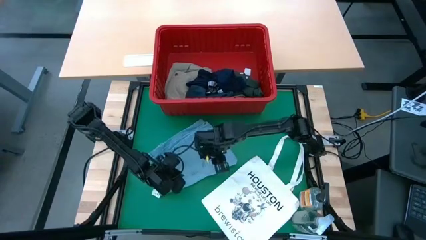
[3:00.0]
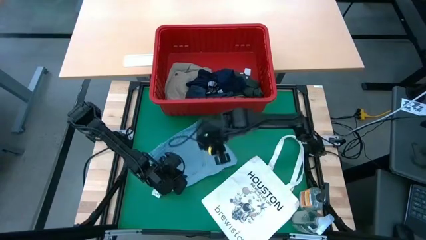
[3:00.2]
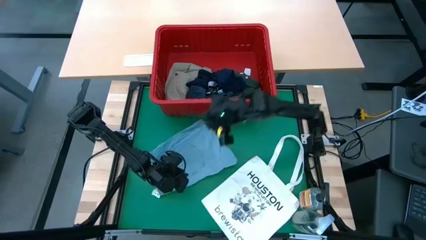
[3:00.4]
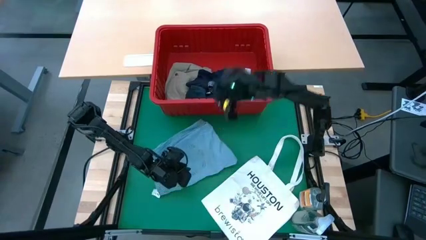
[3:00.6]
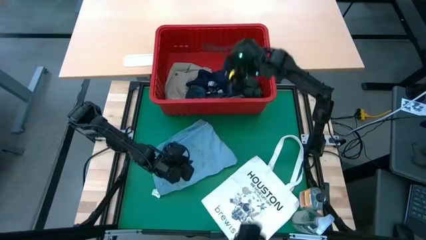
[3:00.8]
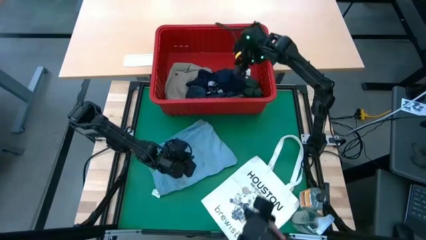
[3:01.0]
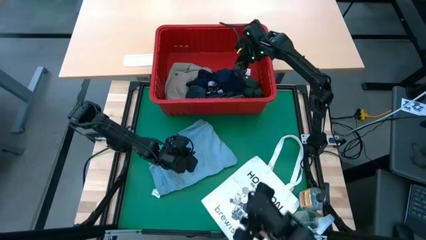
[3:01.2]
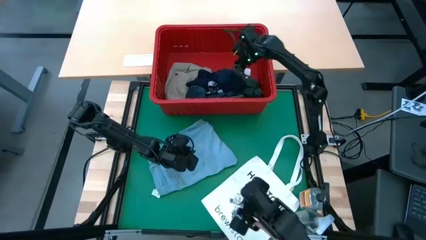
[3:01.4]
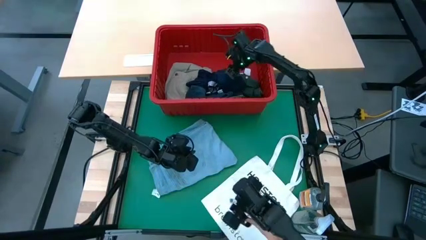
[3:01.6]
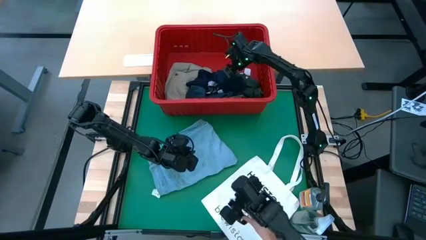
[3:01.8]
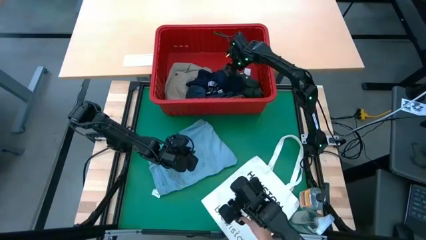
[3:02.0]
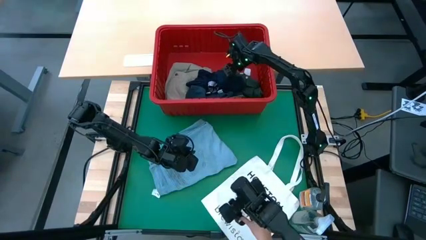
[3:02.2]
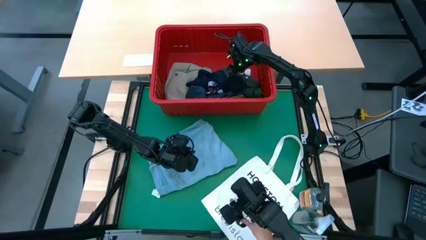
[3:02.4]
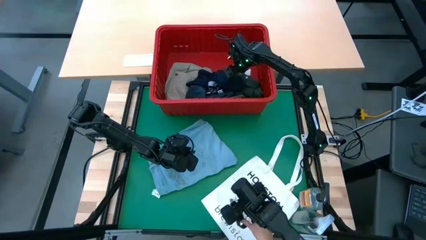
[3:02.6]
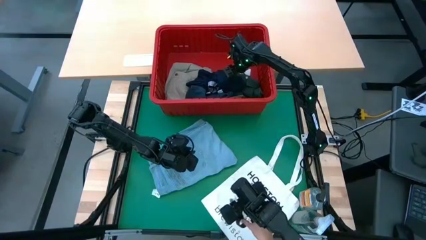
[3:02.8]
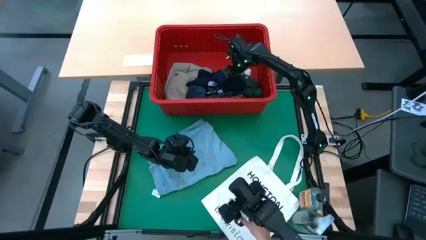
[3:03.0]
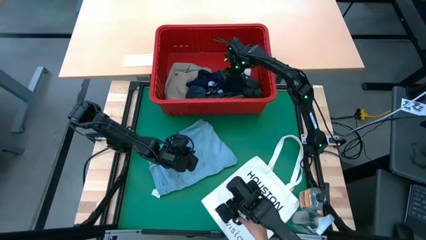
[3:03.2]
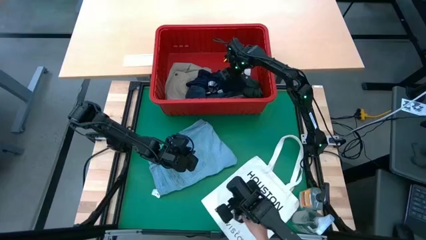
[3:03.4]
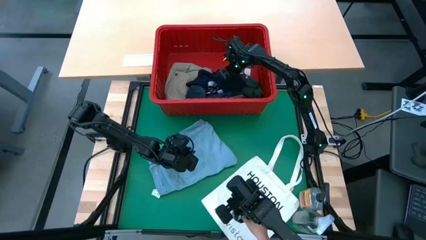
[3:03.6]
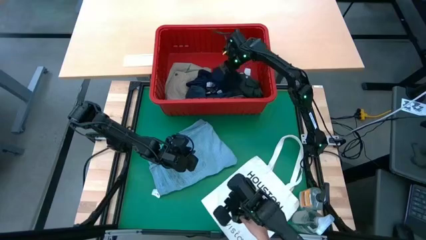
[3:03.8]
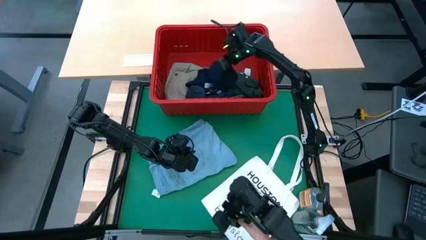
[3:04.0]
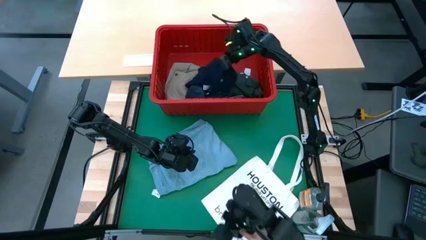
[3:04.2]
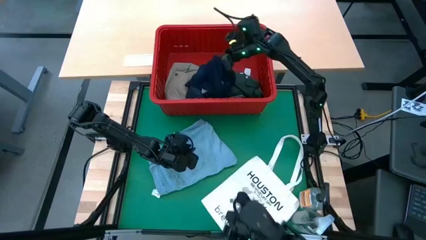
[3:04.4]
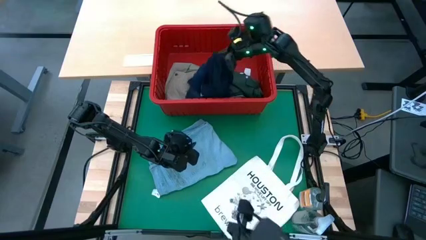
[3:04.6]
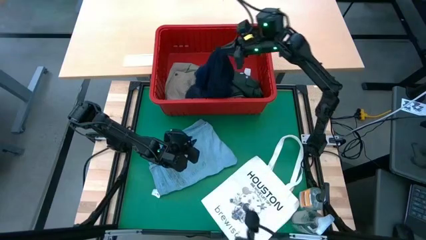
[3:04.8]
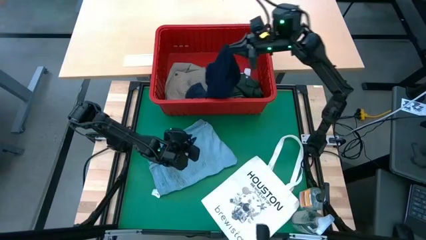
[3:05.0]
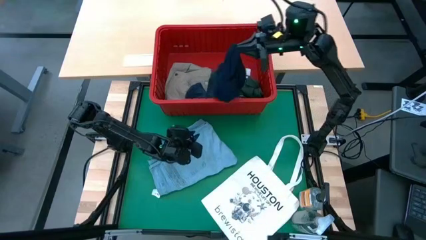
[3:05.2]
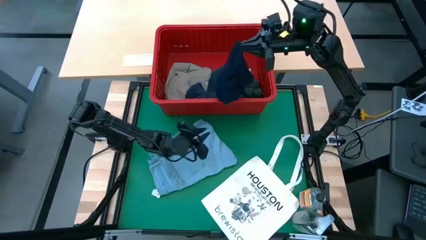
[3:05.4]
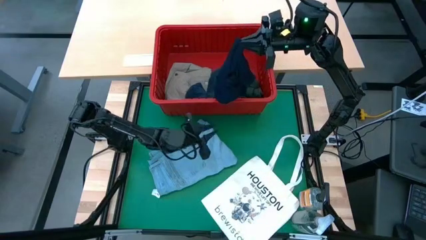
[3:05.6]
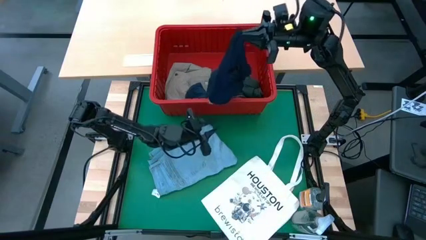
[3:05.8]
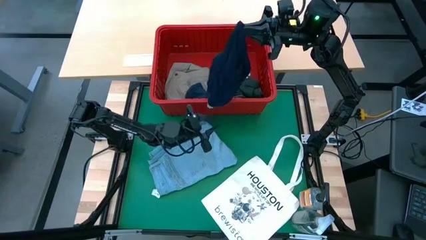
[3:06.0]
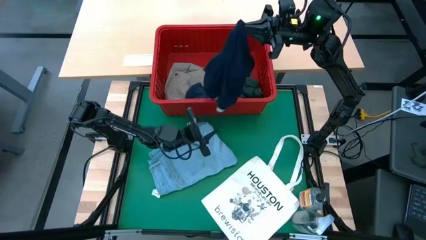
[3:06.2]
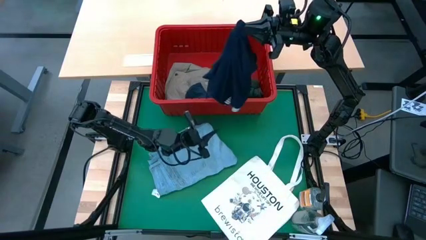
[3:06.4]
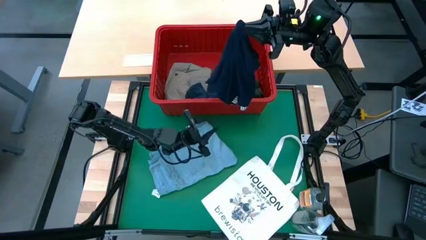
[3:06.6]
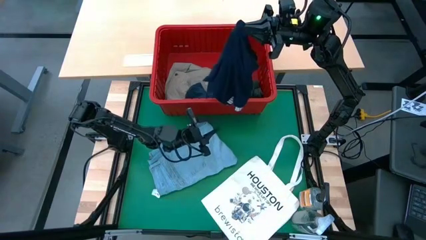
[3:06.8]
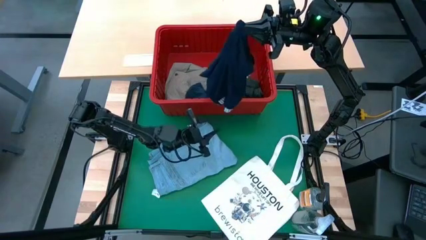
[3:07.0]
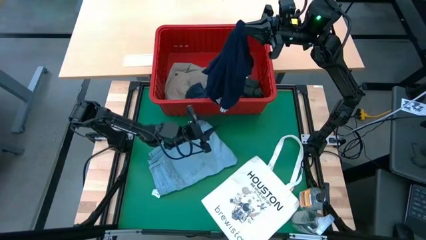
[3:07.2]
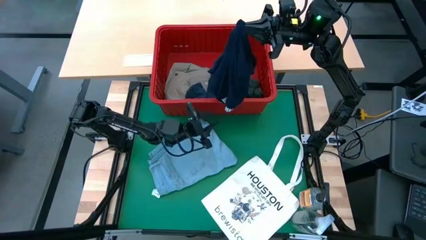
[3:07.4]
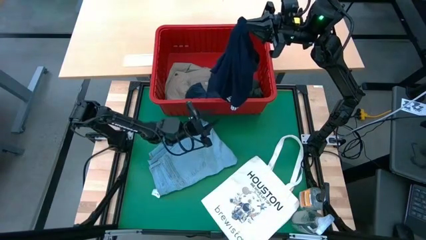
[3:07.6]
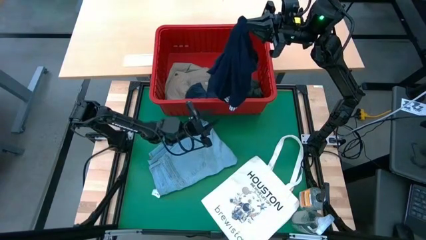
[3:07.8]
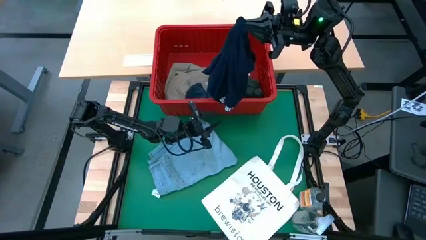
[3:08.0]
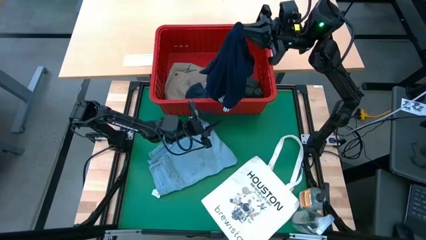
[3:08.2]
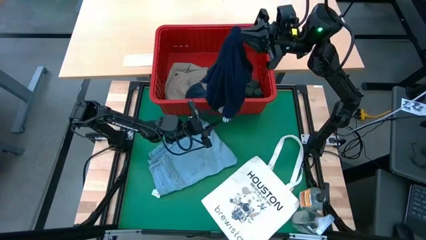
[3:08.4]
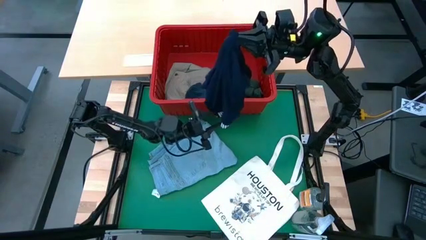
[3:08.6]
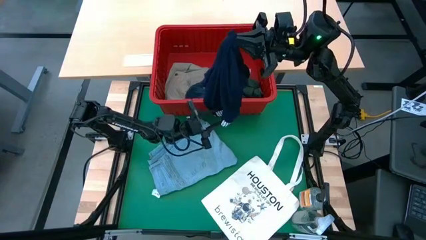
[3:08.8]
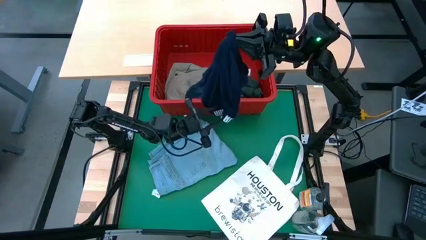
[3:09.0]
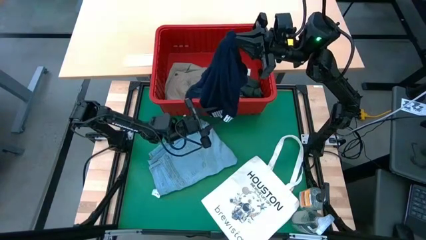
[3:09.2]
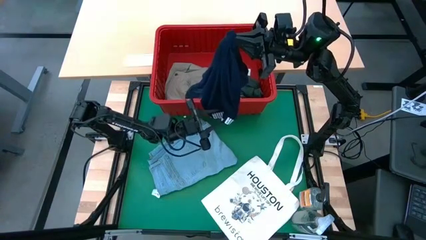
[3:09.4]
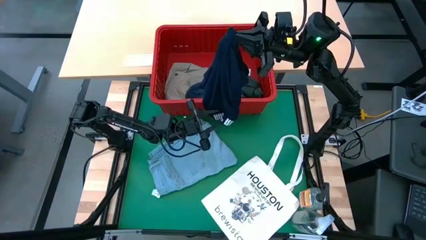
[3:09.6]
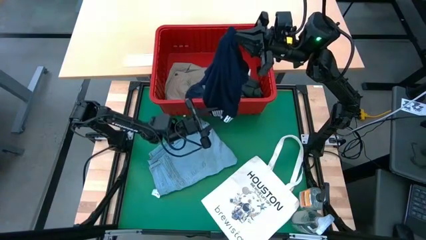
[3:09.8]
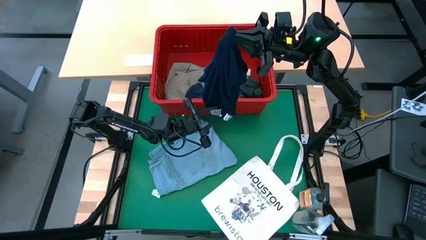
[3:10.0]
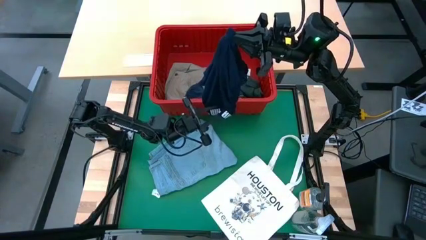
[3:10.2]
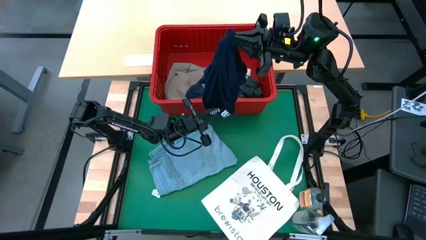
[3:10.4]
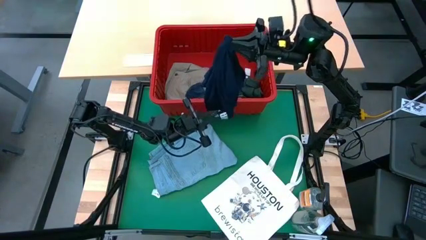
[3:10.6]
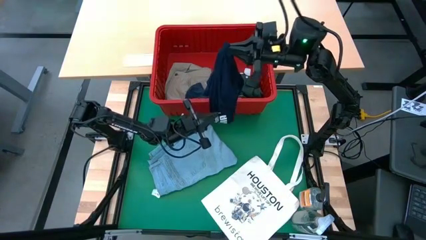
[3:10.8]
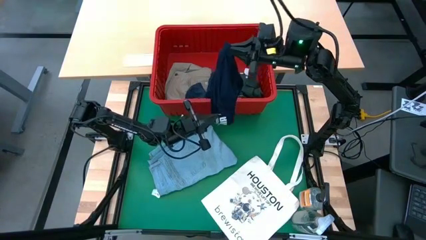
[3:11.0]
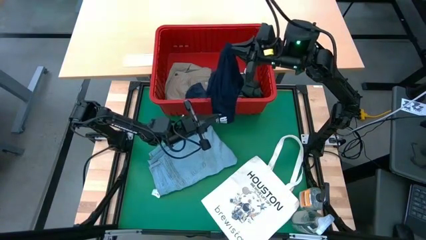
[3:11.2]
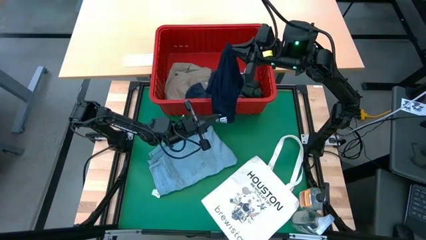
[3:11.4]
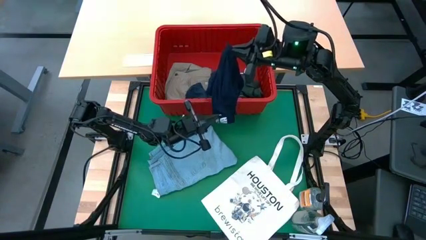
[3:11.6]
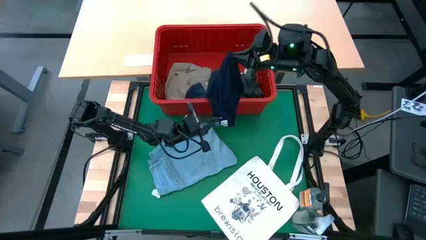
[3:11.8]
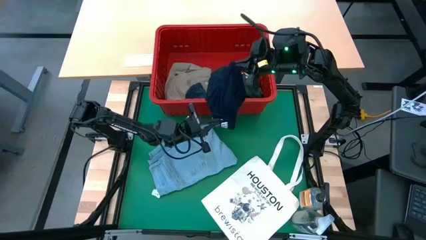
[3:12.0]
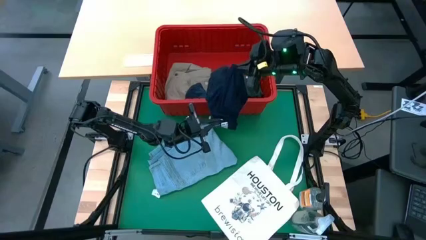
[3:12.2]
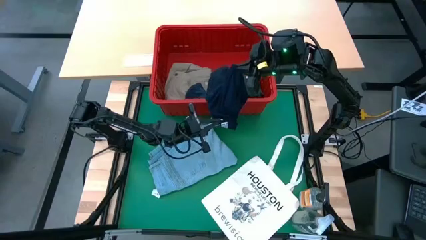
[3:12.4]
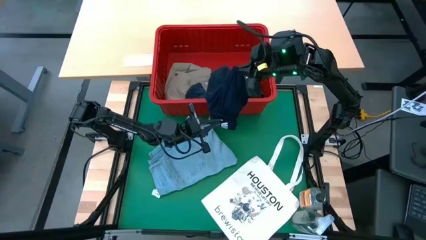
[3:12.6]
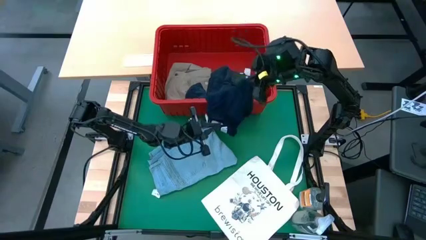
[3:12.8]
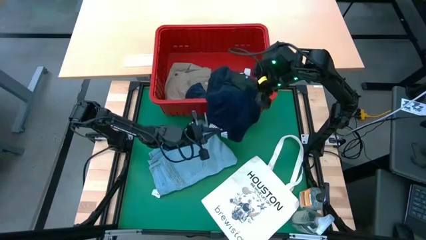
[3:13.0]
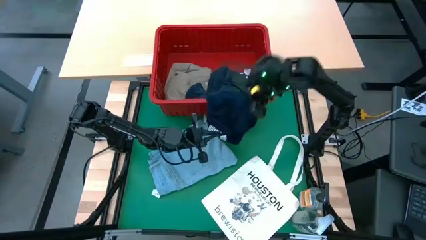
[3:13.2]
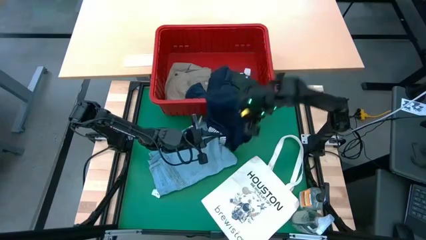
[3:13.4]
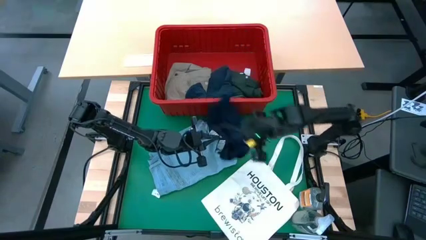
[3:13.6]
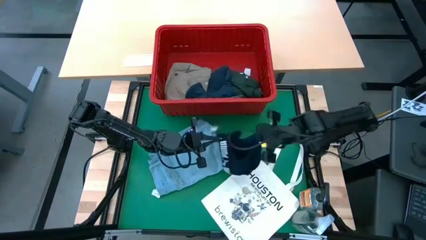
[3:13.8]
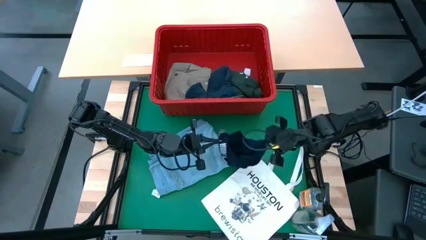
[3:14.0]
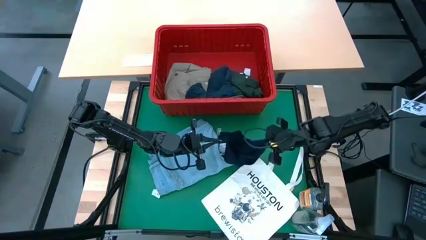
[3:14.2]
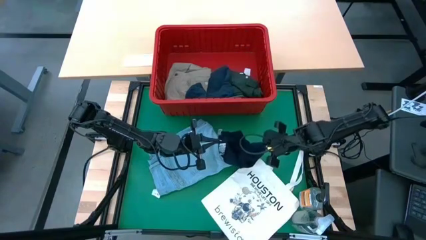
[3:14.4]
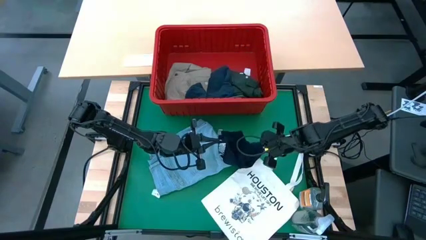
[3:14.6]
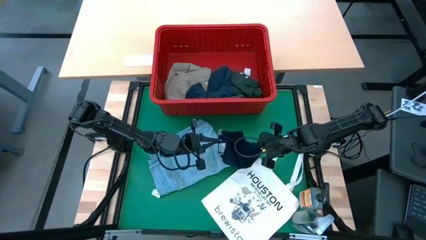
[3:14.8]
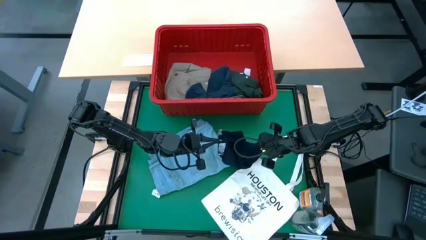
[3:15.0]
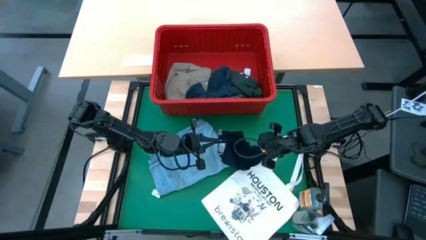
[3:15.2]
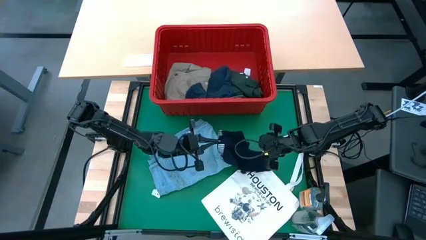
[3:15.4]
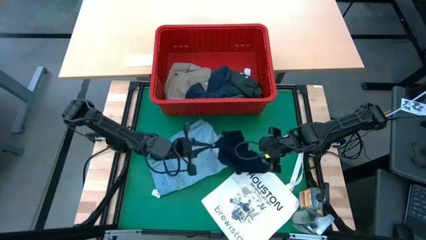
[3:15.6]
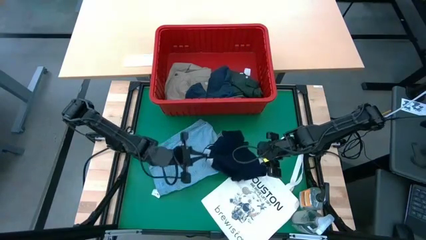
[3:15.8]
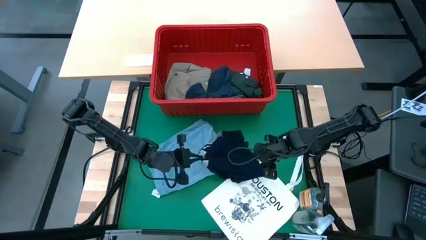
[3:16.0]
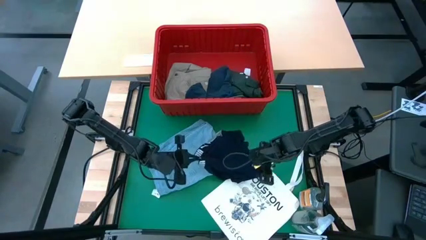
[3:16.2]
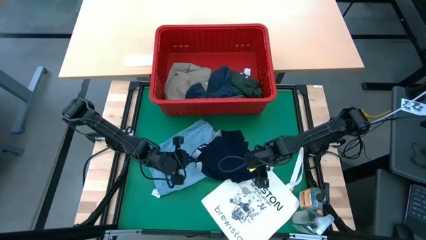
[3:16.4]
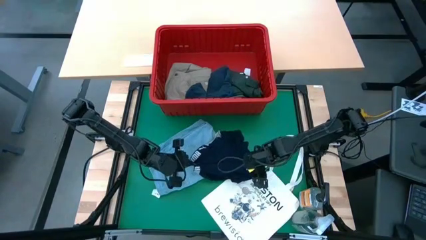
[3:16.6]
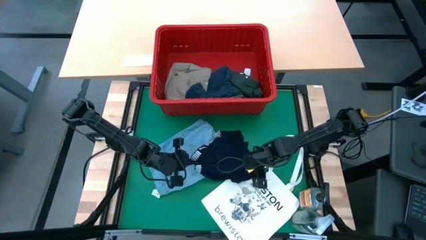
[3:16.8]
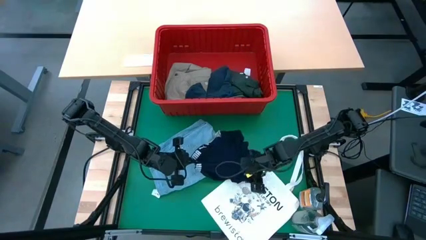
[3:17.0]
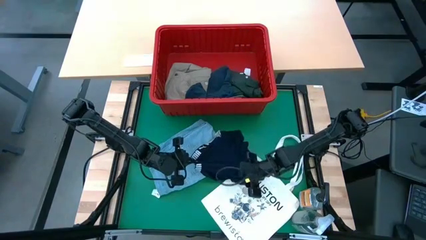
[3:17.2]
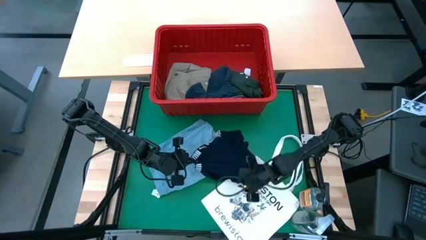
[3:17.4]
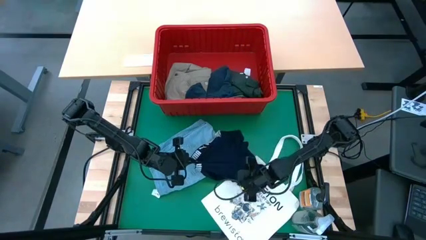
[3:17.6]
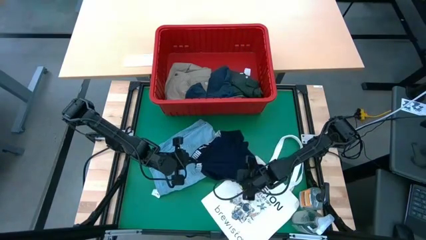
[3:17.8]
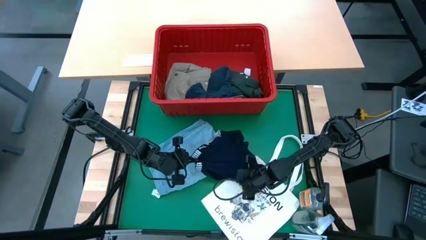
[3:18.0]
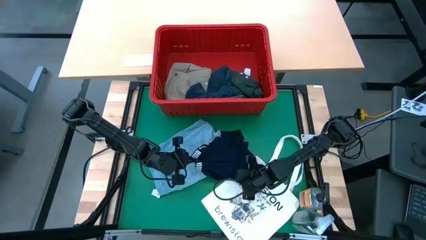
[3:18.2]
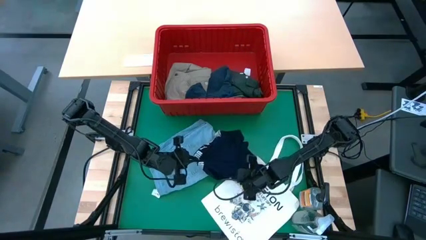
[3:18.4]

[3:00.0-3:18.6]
Task: Fold Laundry from Bin
Fold the dark blue boxer shorts
